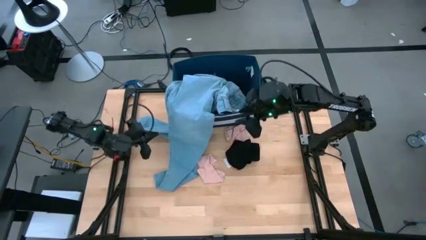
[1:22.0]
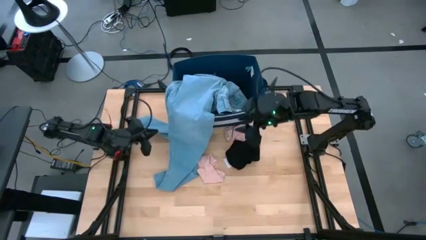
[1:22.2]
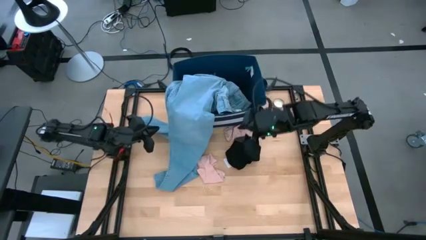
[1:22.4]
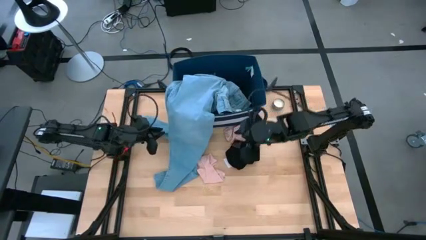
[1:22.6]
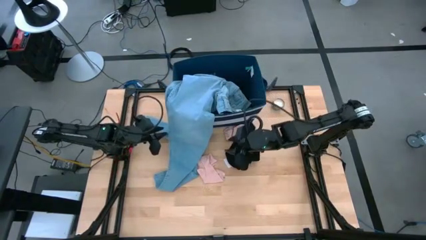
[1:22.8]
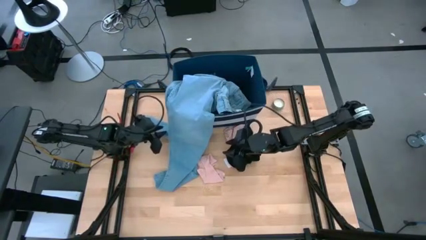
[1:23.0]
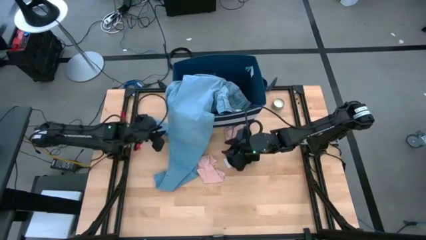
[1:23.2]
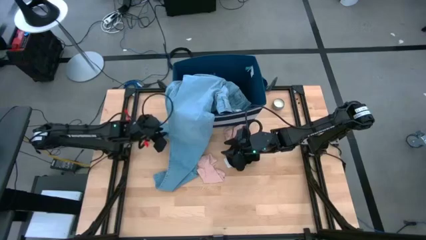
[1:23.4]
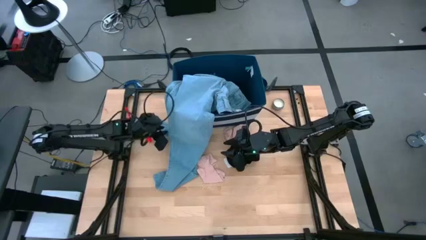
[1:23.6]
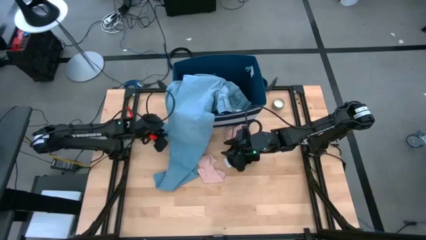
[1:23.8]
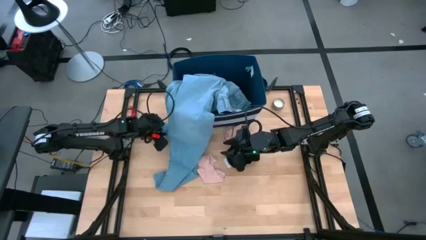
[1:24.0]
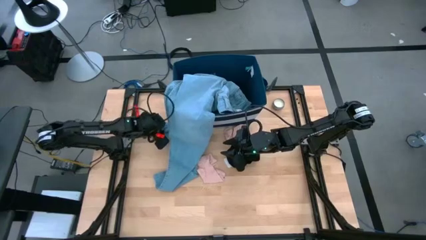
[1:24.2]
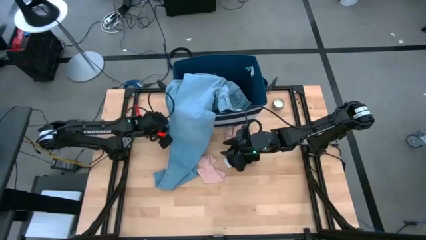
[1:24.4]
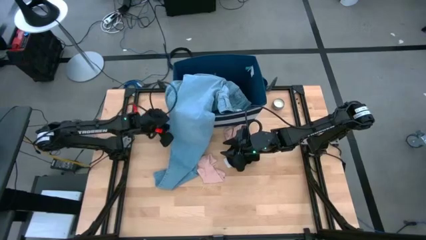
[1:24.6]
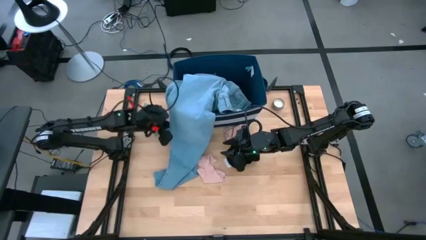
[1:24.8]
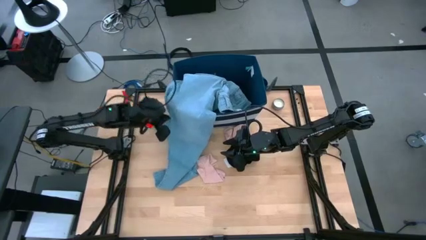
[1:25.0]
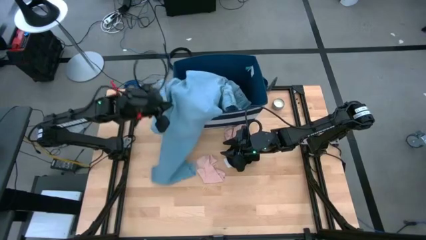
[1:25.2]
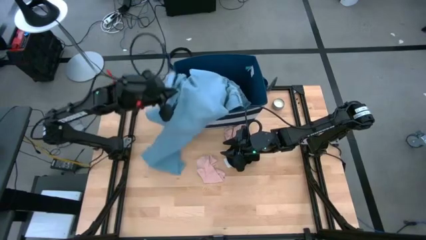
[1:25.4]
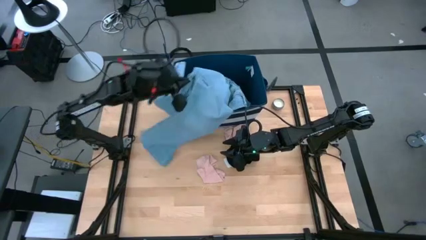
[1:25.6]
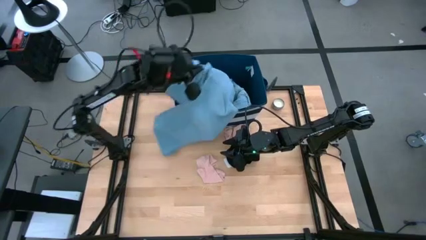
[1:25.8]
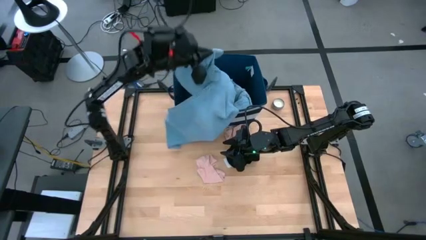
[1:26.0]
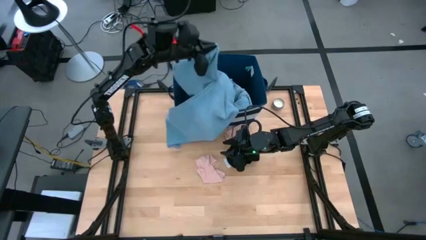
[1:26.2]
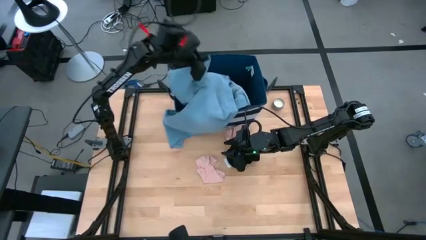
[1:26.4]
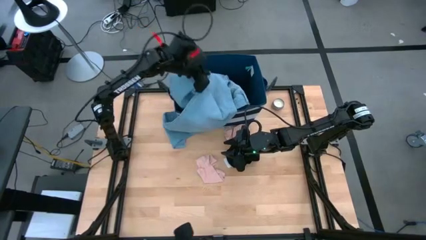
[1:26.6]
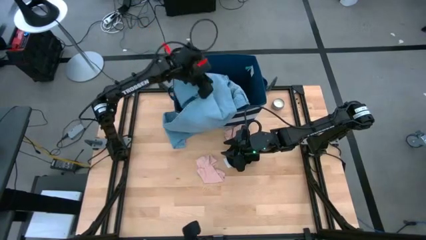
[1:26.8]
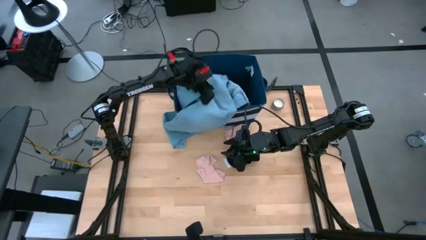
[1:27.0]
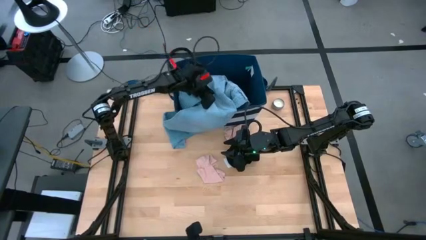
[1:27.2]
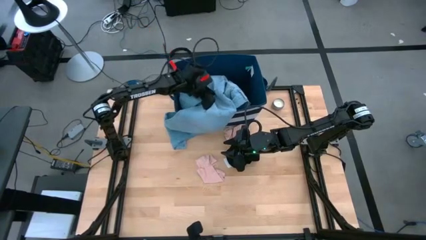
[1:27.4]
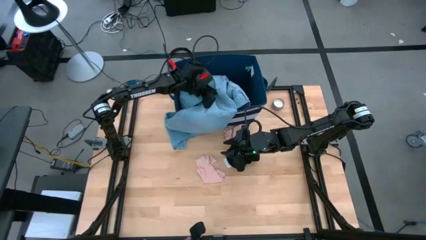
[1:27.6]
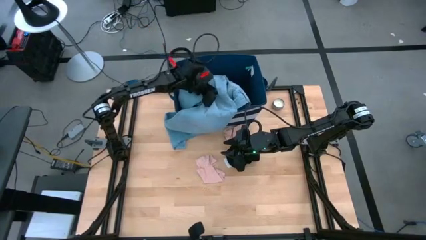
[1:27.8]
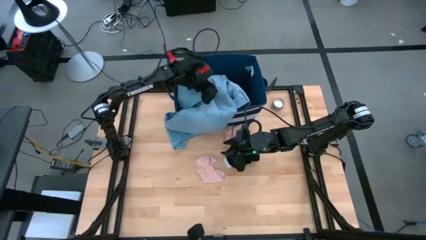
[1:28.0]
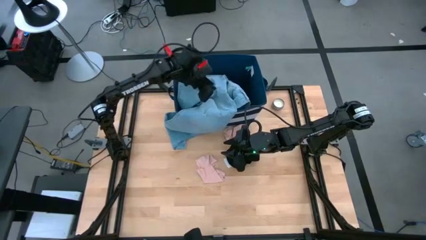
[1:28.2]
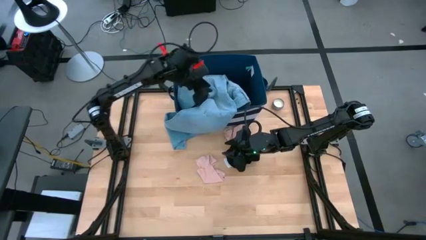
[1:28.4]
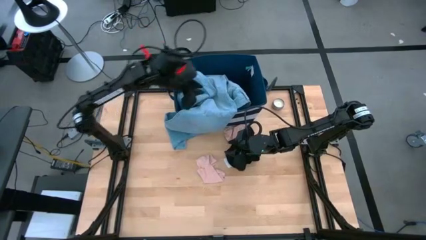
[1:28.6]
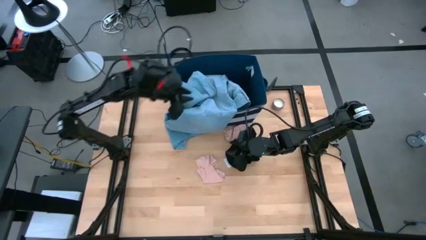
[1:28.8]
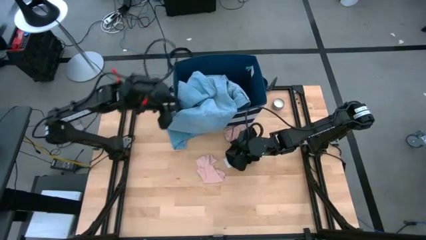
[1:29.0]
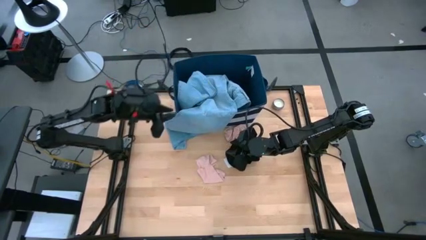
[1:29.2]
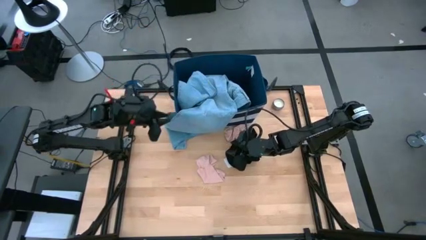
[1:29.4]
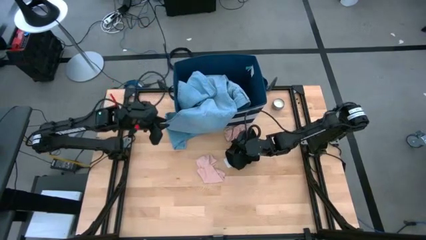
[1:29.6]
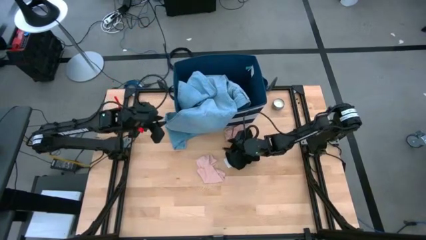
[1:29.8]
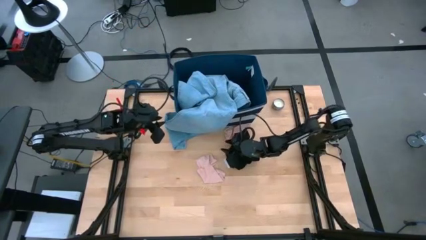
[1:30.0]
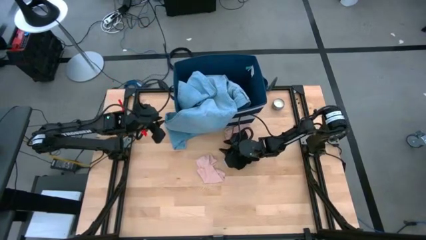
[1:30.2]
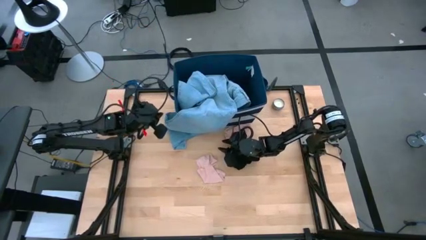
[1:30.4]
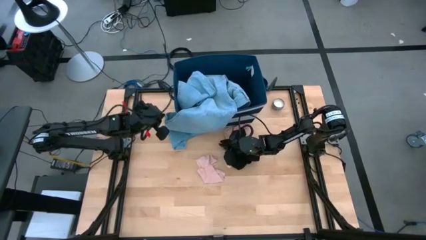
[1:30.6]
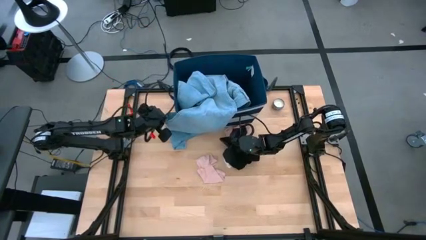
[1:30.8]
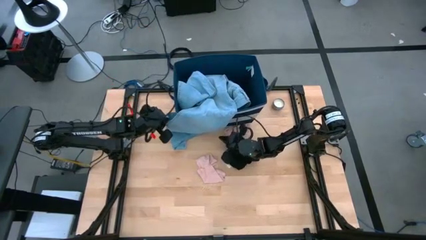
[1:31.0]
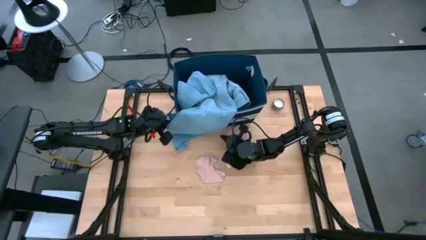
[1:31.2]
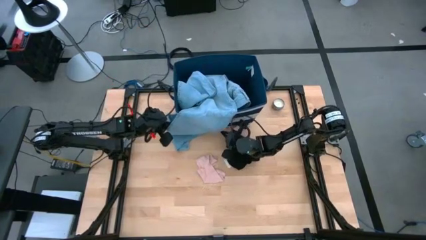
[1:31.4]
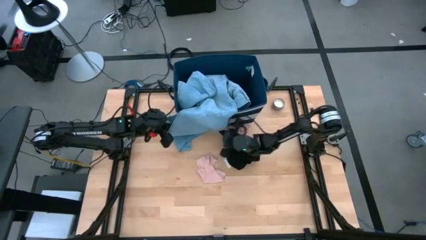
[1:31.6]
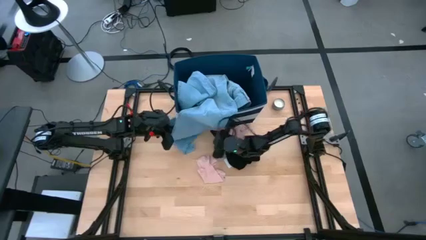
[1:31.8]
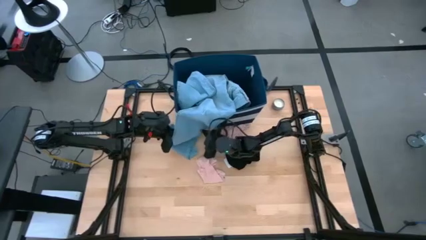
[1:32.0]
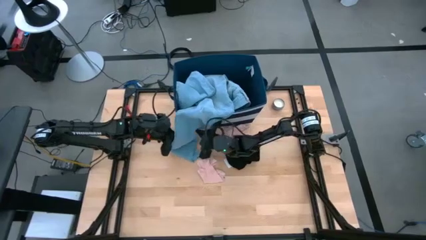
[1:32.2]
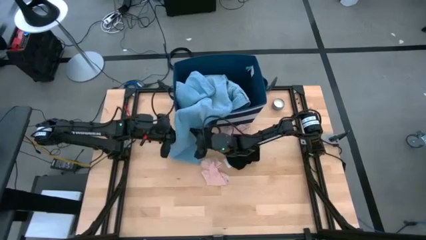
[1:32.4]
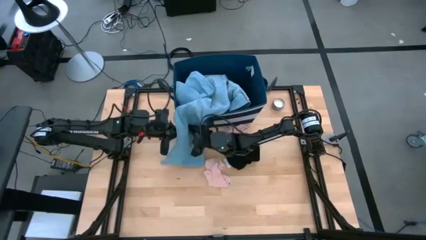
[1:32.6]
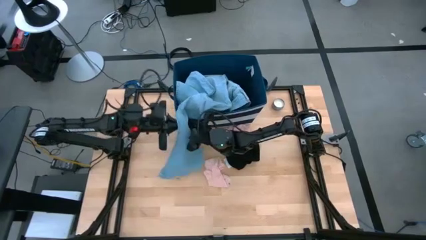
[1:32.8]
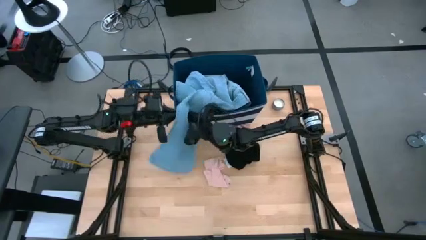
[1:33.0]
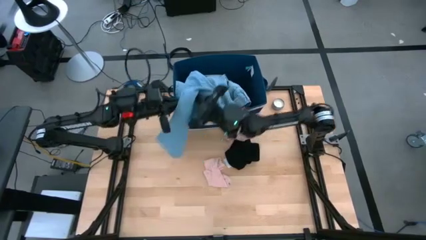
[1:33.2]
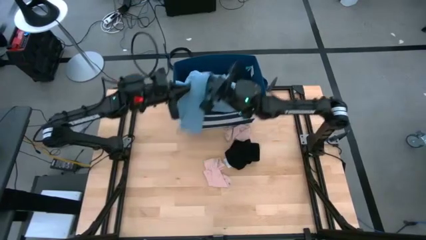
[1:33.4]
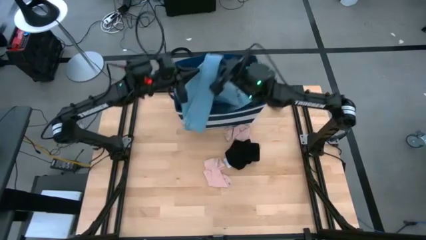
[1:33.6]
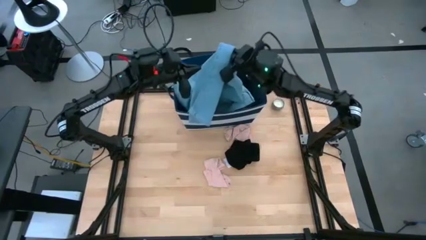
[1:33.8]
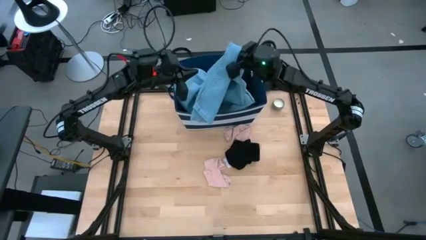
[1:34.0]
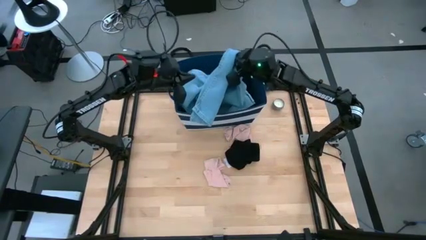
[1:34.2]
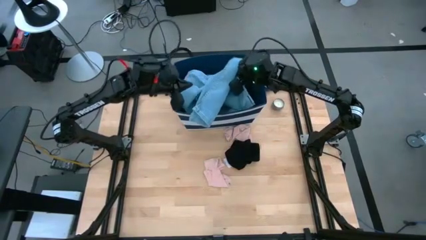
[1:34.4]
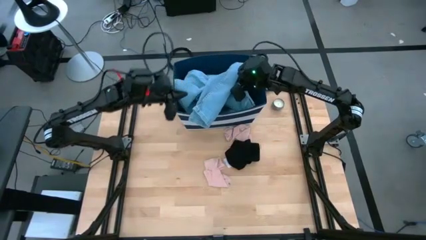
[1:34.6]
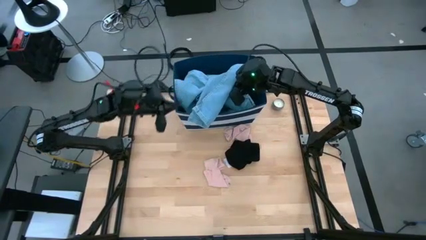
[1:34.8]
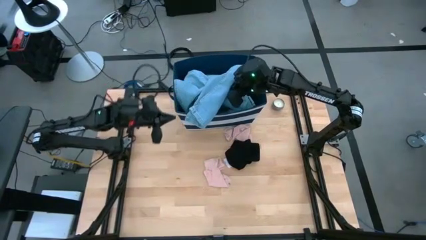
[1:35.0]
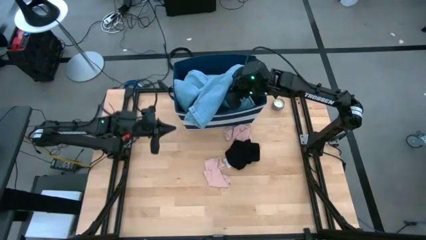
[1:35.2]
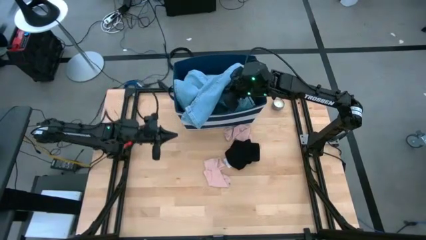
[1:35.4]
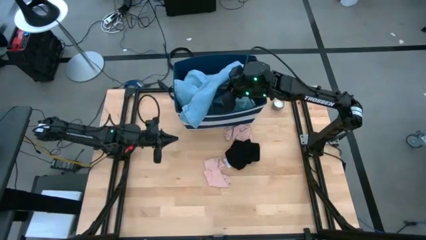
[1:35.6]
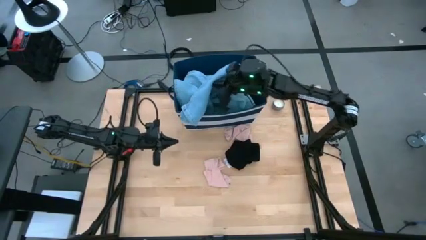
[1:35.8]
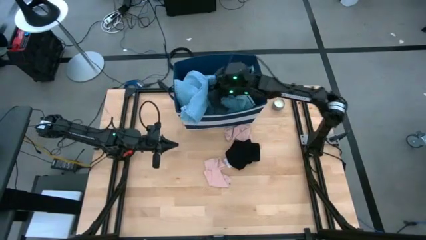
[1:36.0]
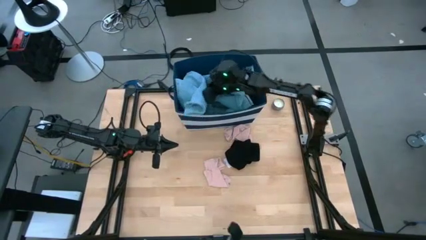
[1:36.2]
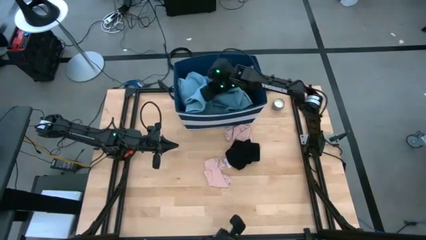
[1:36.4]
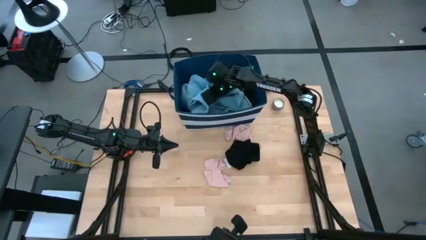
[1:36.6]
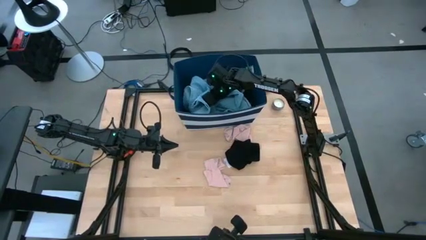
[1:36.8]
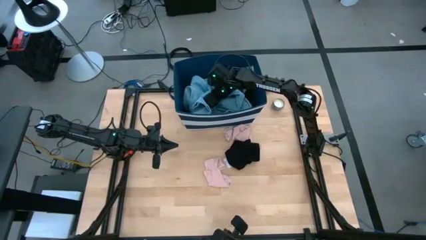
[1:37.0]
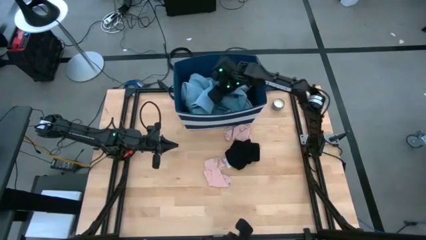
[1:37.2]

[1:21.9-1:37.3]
Task: Sort clothes
Put the light blue pants into the blue organizer bin
